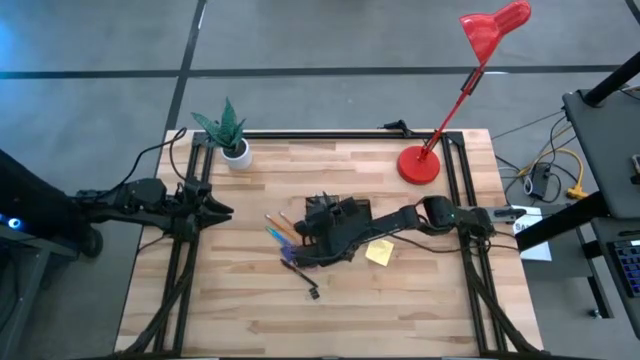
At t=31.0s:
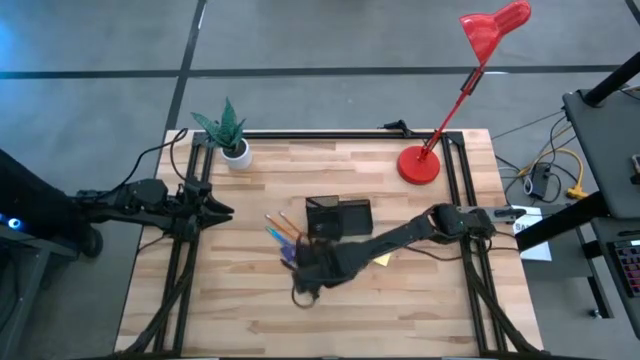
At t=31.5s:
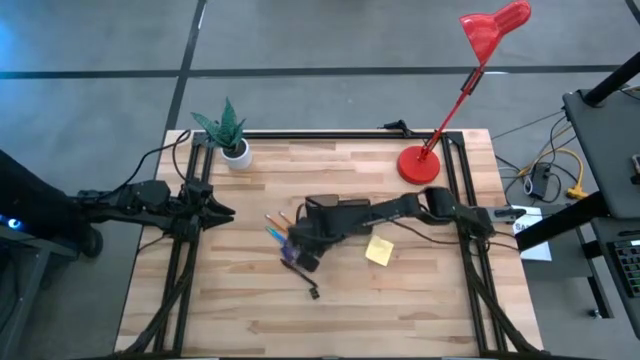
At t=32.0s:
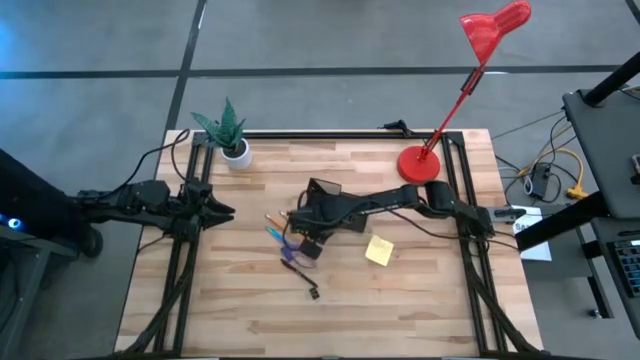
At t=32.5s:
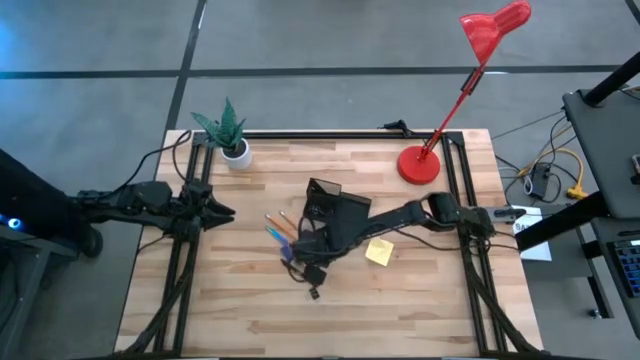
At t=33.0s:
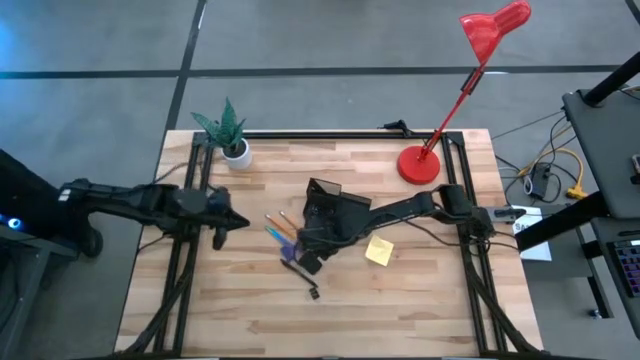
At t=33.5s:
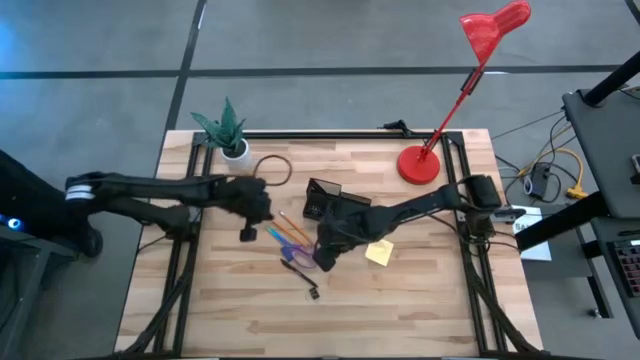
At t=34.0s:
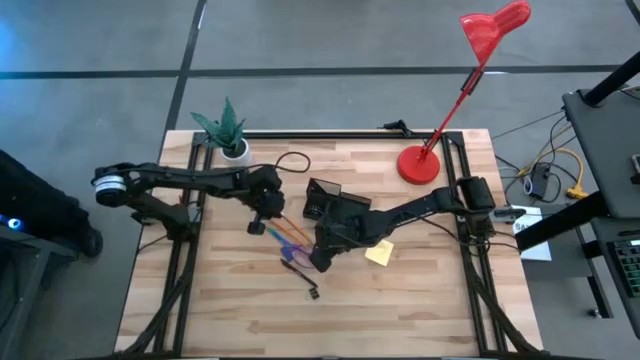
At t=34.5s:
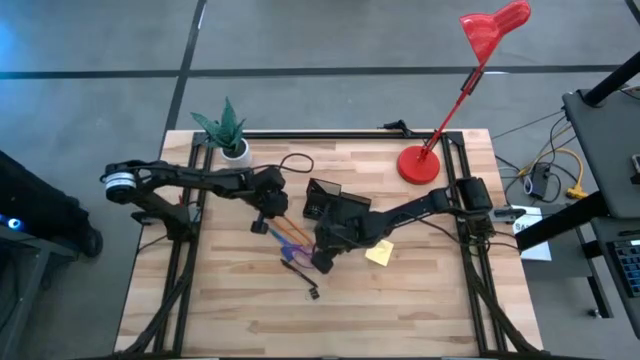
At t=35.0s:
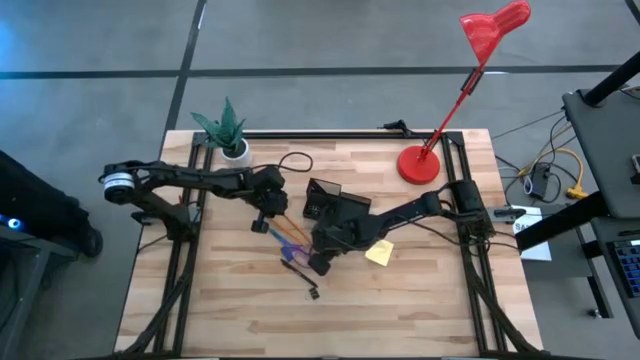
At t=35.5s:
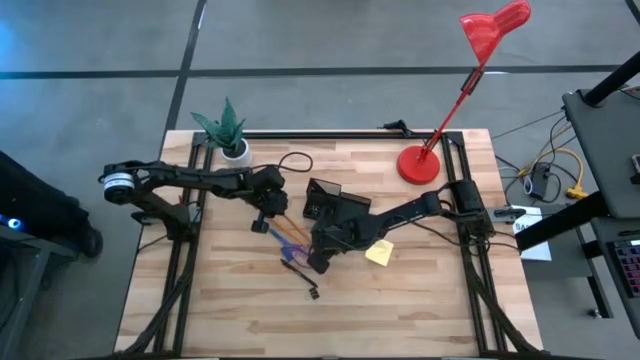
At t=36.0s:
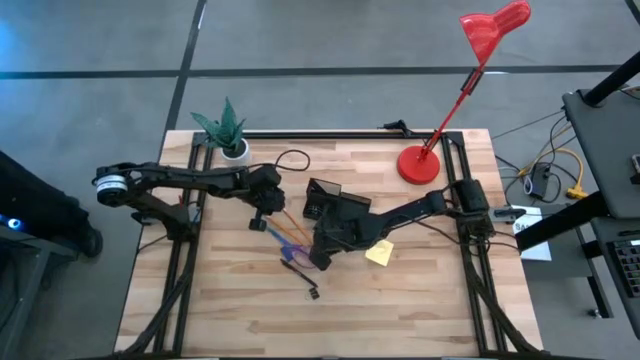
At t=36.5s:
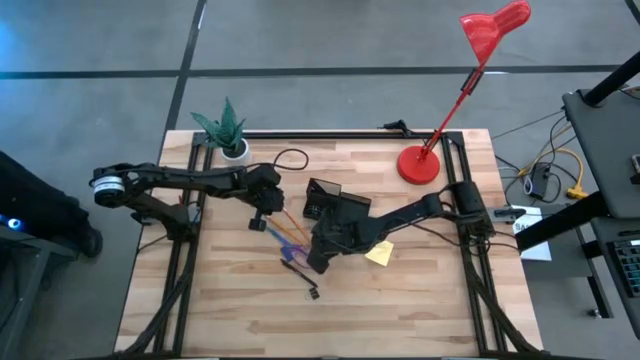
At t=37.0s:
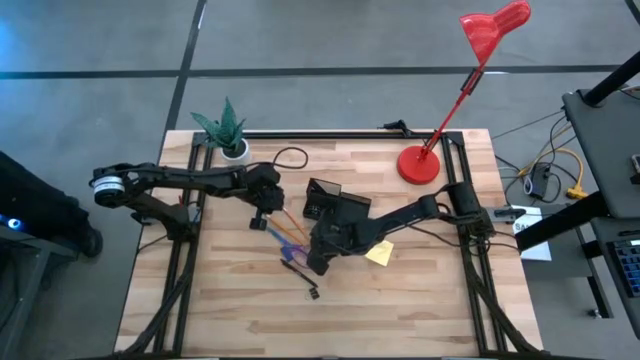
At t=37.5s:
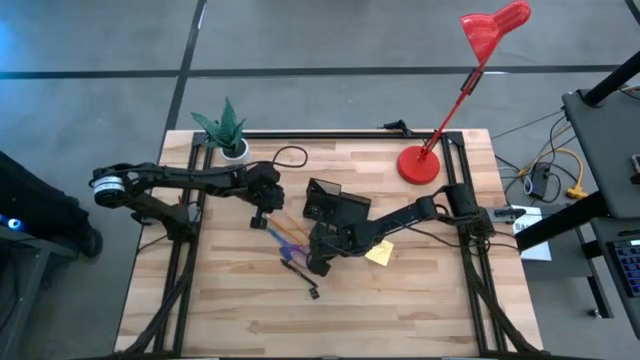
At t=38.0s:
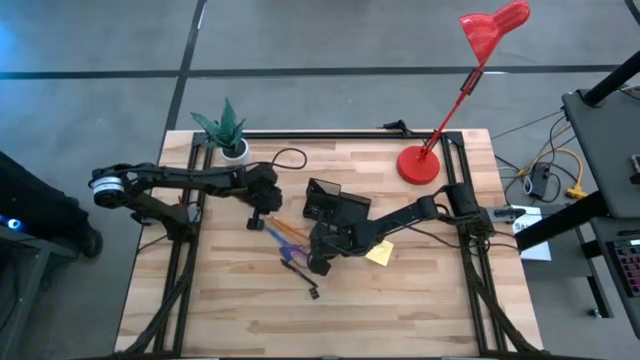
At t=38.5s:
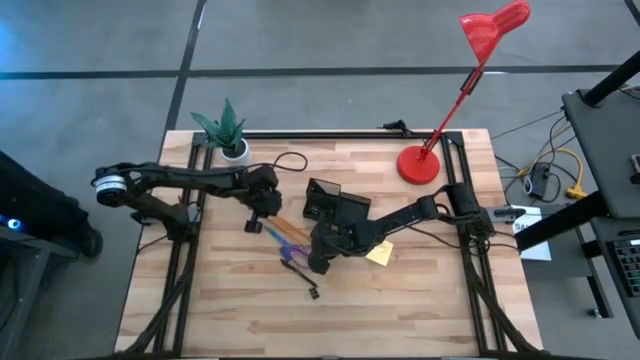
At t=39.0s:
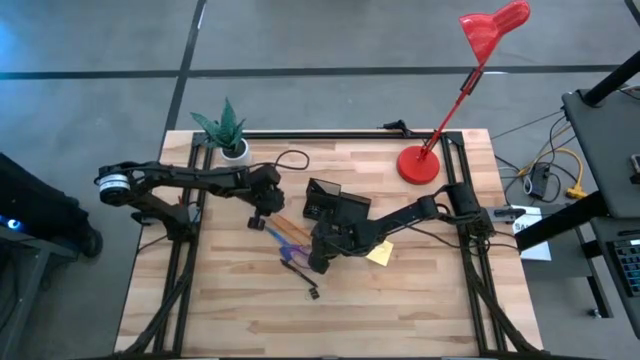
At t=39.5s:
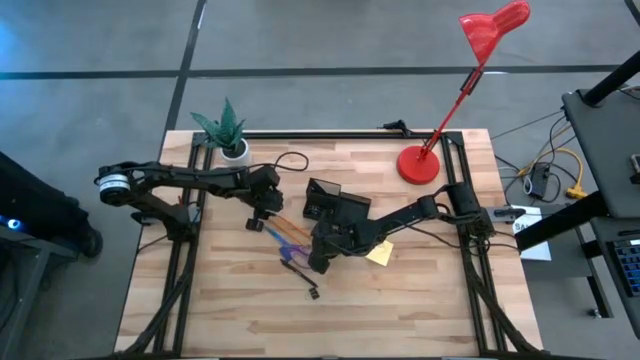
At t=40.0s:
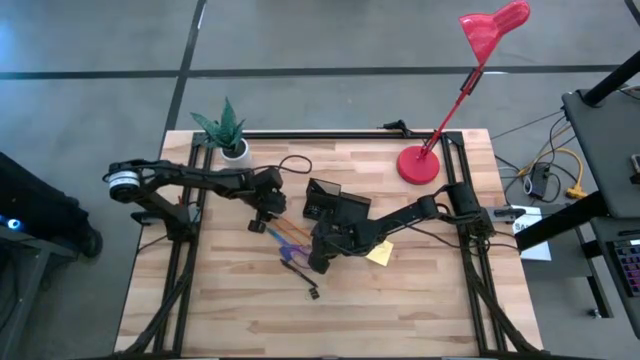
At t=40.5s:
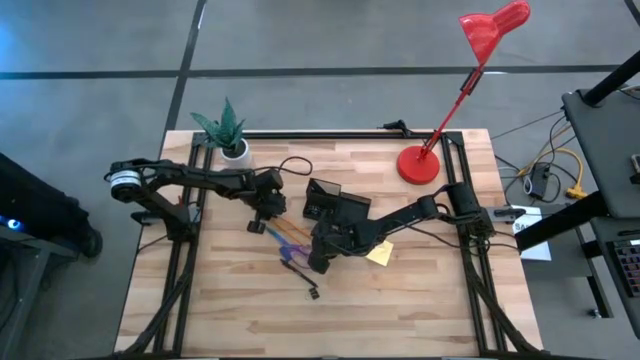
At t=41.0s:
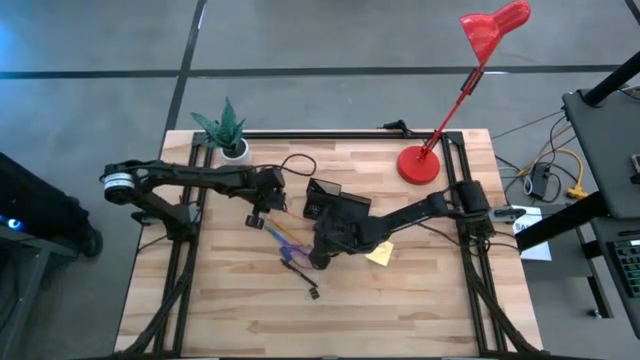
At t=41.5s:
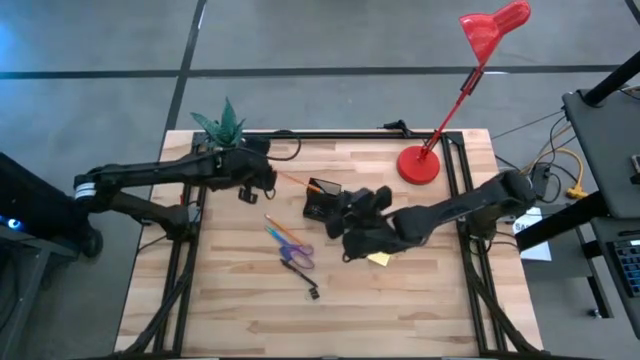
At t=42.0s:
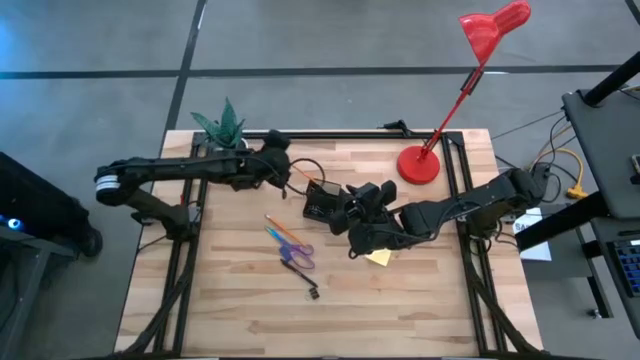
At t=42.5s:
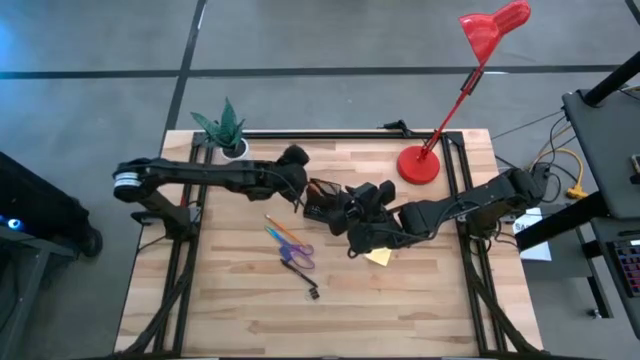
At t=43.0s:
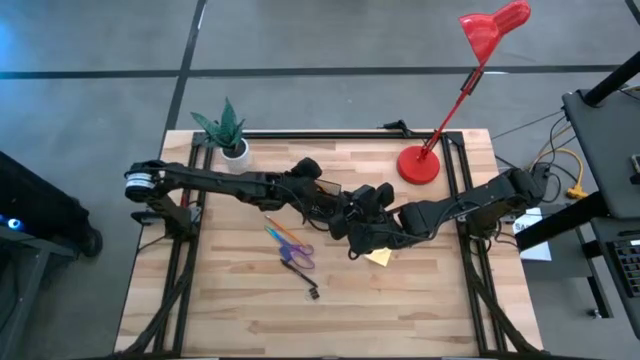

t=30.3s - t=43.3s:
Task: Pick and place office supplies into organizer
Put the top orange pencil into the desk organizer

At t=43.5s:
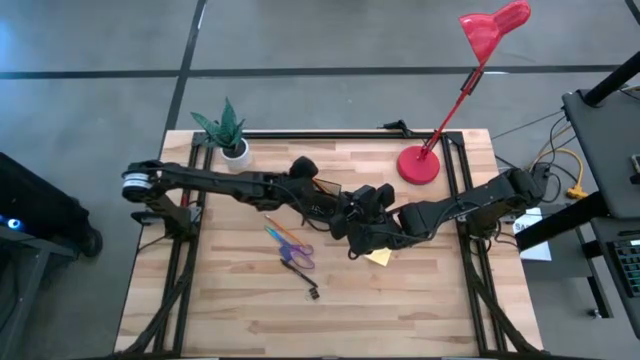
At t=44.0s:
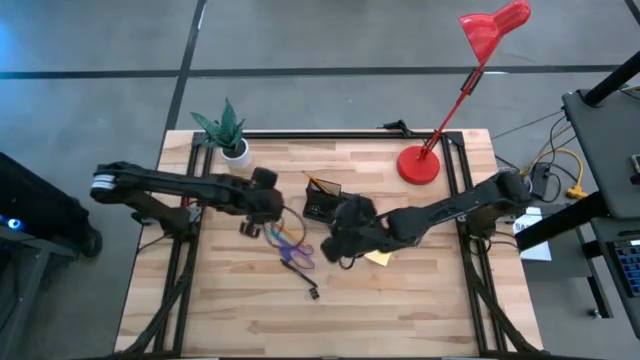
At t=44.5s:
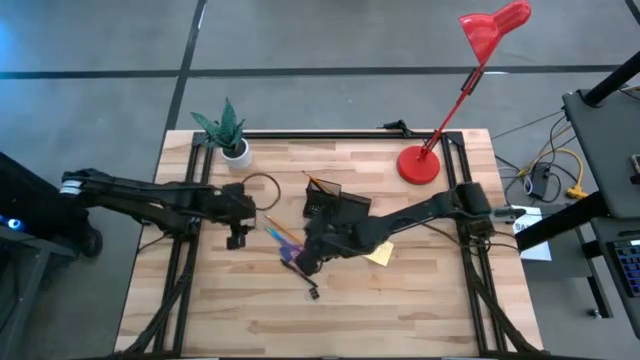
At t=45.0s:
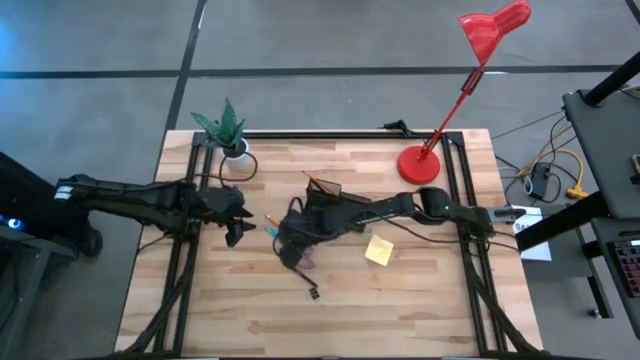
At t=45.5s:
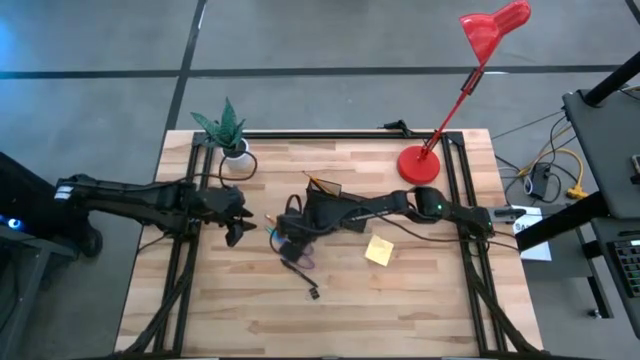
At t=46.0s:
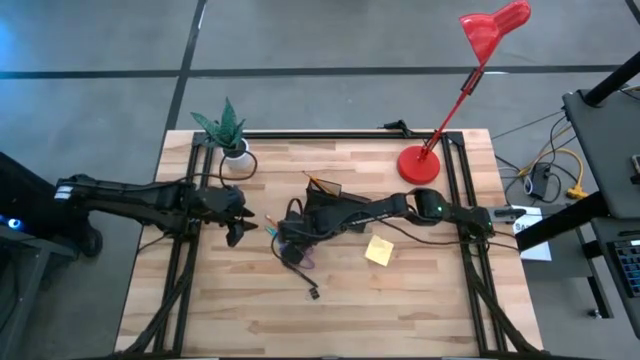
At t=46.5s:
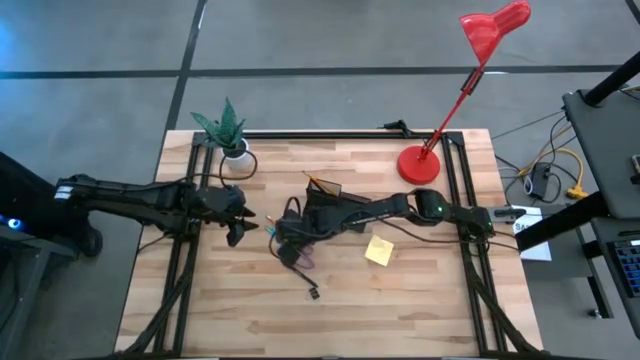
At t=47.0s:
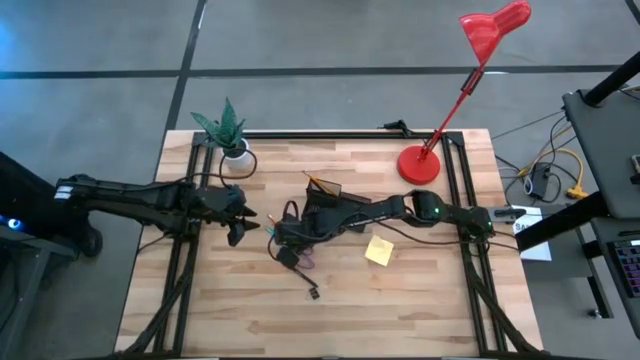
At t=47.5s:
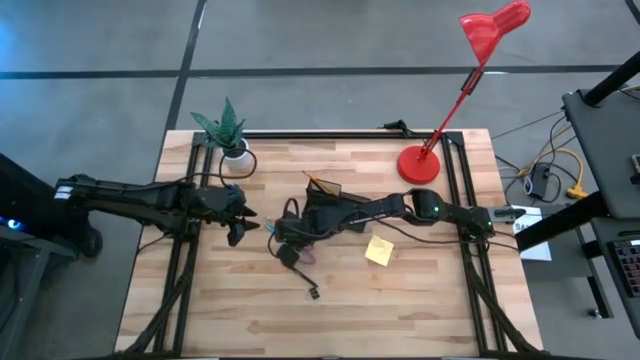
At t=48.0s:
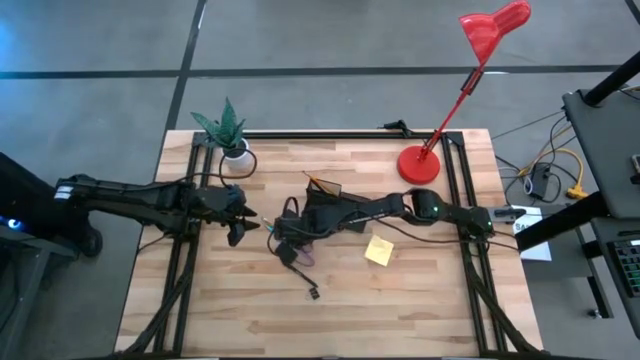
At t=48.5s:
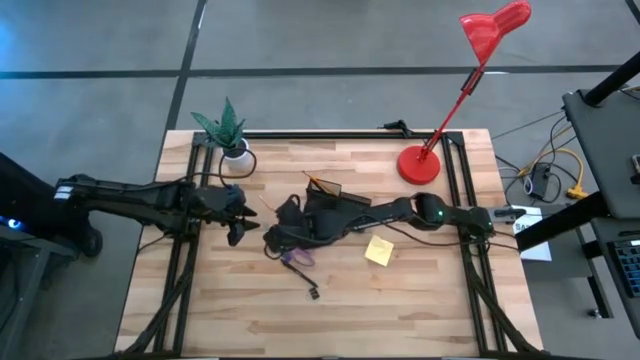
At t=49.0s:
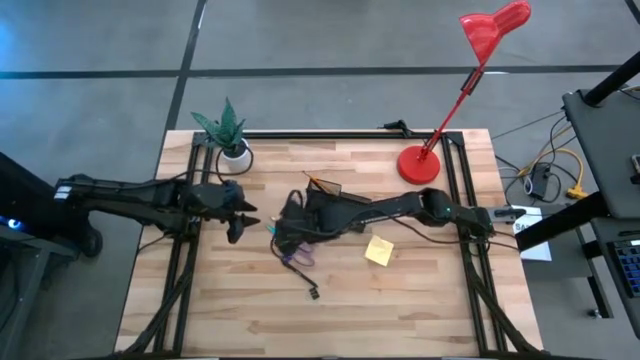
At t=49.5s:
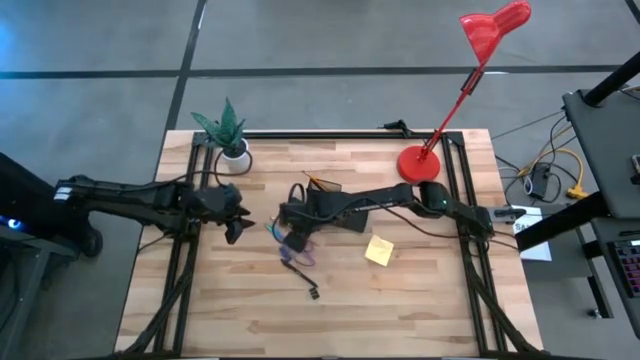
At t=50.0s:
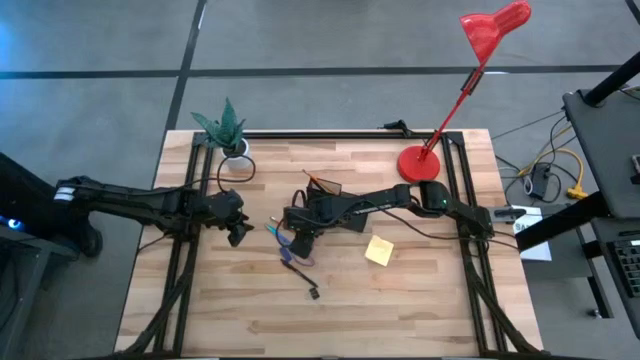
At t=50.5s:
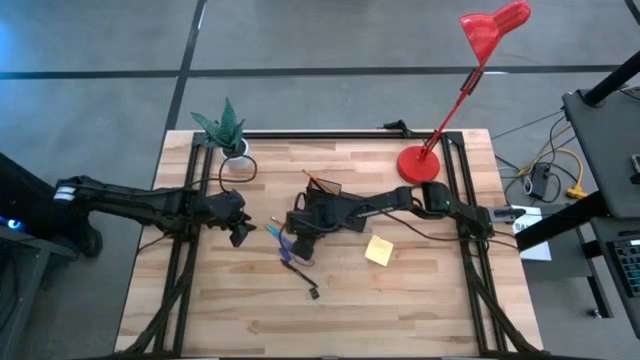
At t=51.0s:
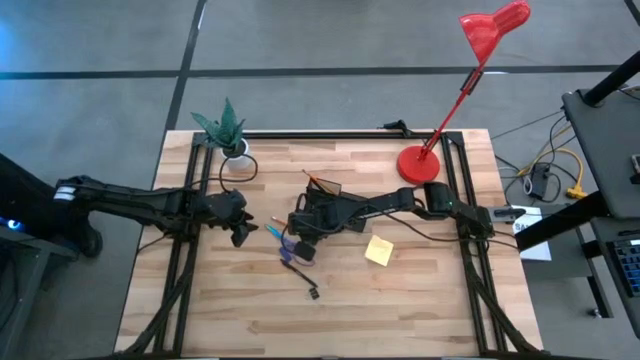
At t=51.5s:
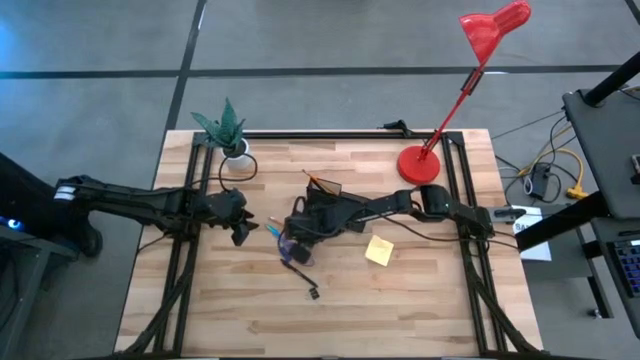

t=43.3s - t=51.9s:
Put the orange pencil into the desk organizer
